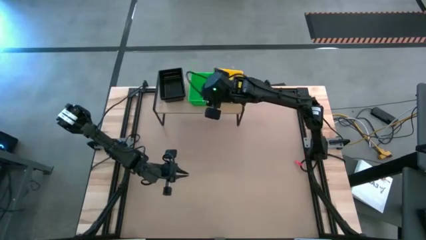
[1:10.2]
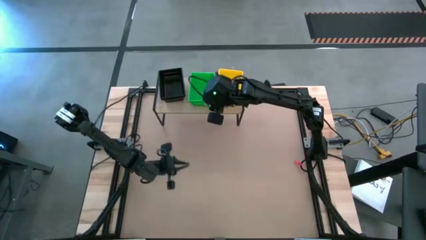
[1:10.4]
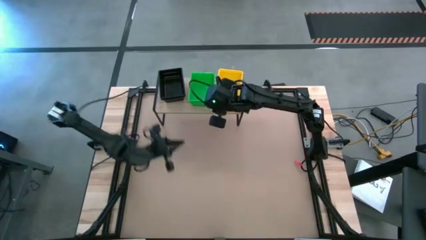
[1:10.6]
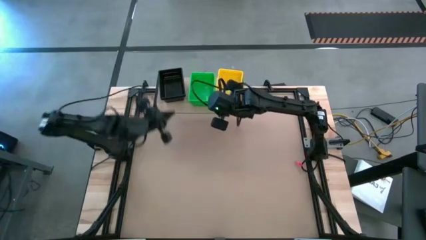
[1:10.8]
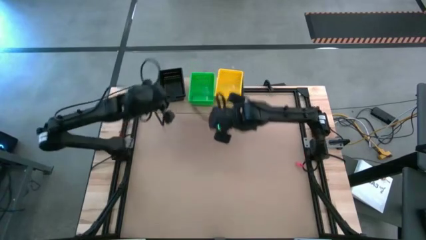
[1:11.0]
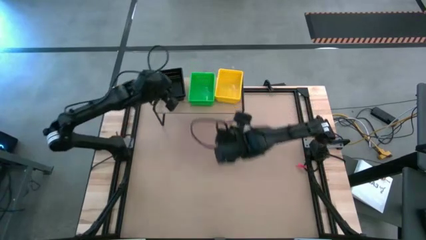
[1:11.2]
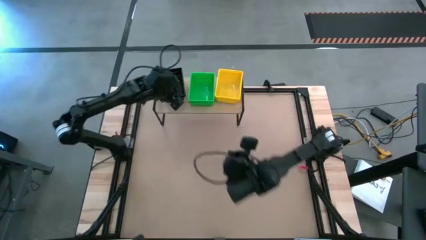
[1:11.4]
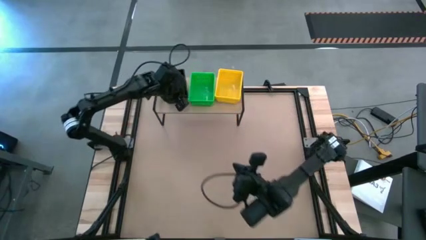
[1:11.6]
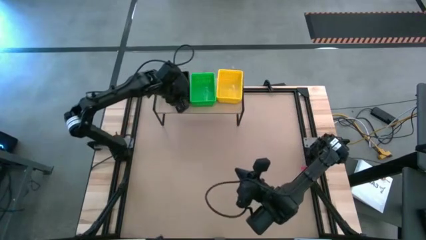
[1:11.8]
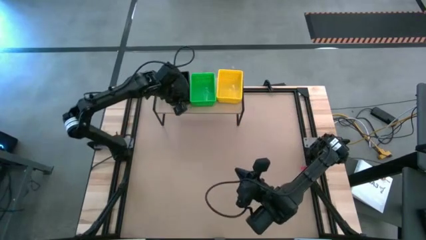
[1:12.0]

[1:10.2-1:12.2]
Task: Stack baskets on shelf by color
Adjust the stacked black bins on the shelf

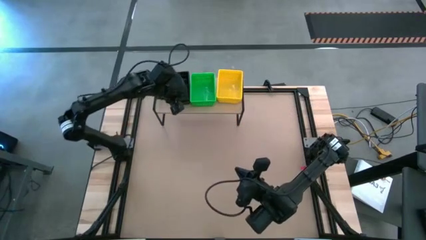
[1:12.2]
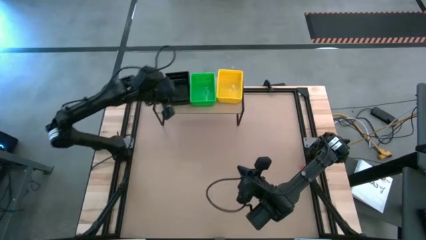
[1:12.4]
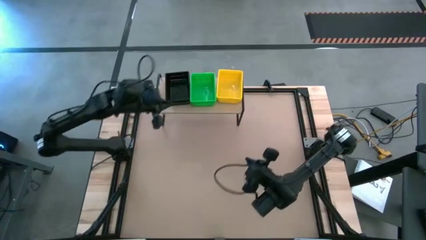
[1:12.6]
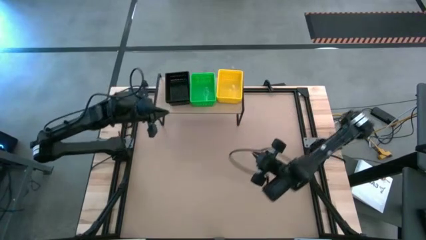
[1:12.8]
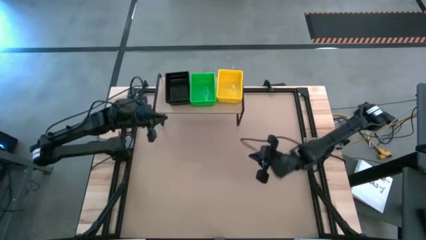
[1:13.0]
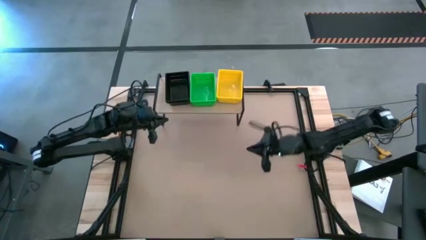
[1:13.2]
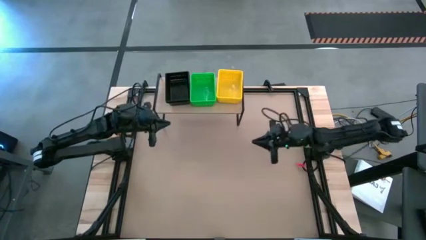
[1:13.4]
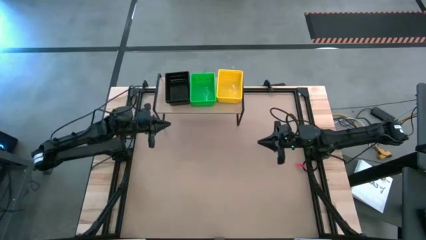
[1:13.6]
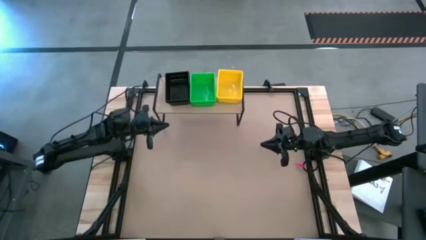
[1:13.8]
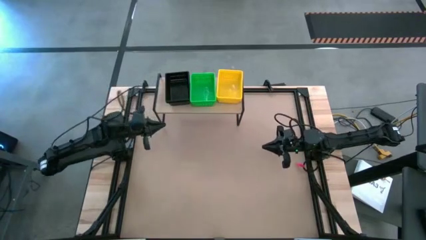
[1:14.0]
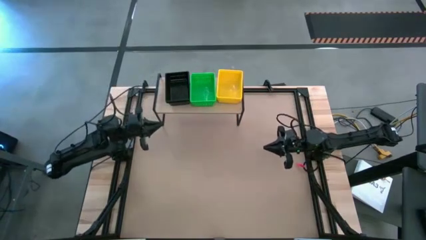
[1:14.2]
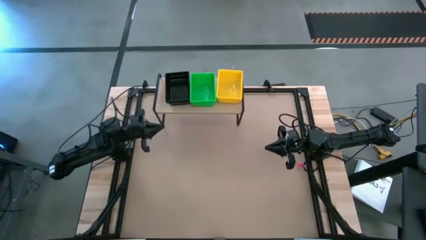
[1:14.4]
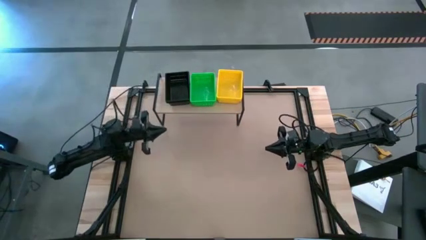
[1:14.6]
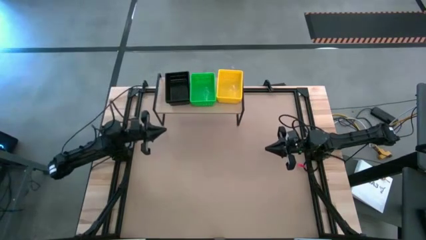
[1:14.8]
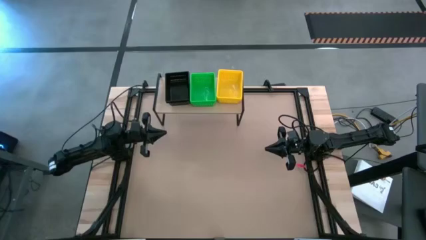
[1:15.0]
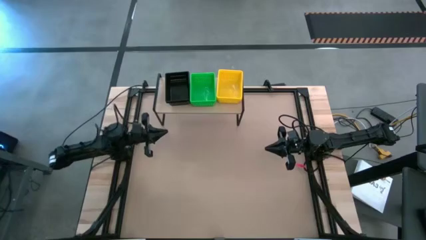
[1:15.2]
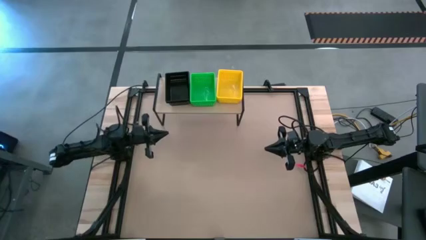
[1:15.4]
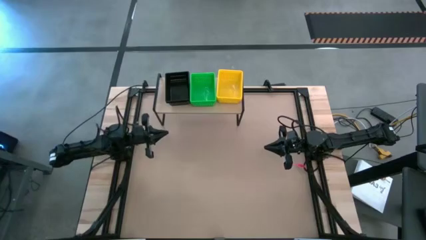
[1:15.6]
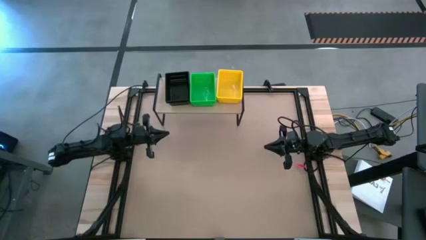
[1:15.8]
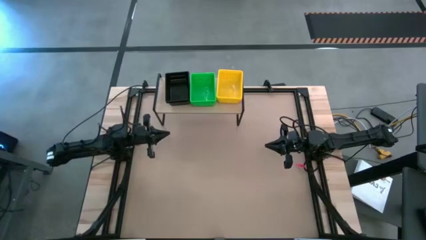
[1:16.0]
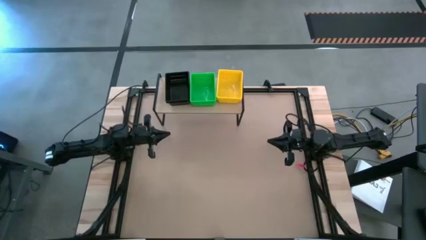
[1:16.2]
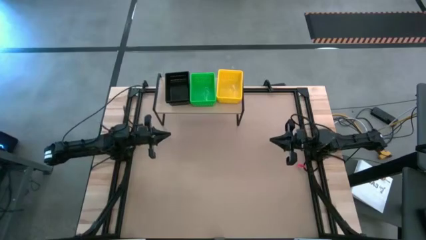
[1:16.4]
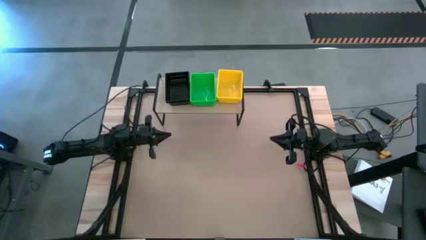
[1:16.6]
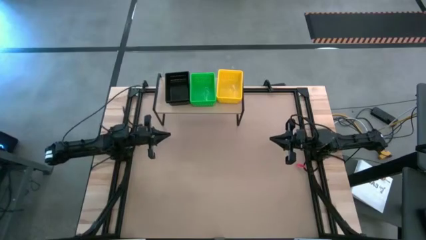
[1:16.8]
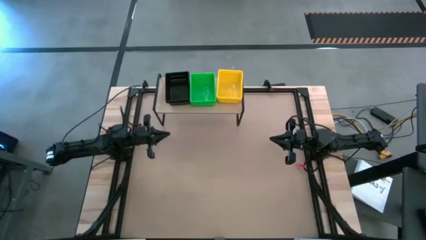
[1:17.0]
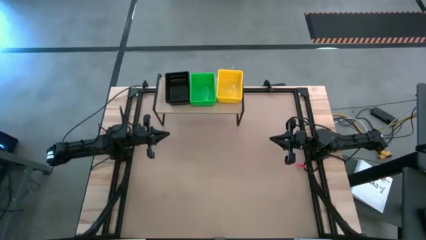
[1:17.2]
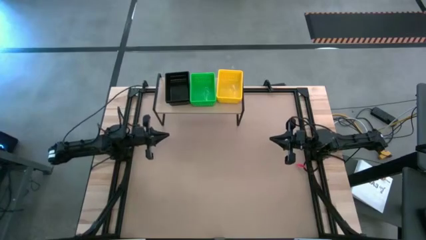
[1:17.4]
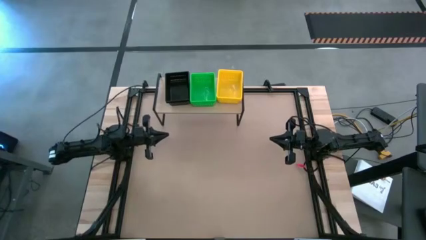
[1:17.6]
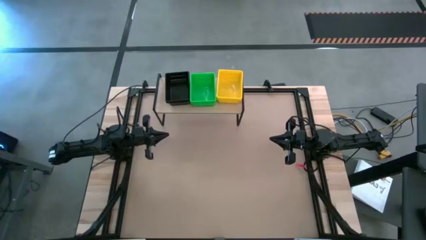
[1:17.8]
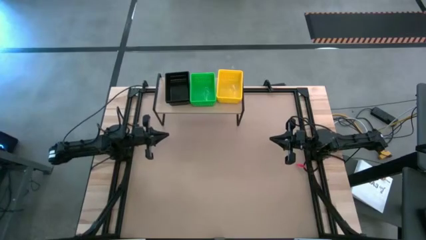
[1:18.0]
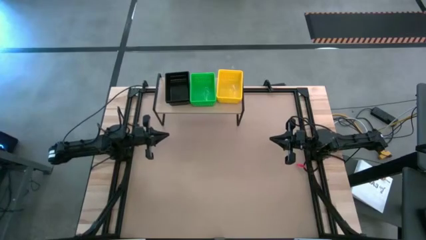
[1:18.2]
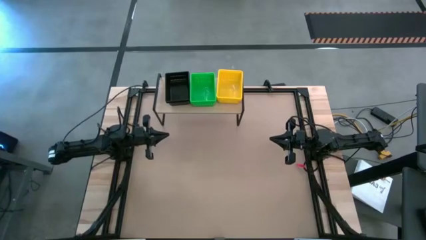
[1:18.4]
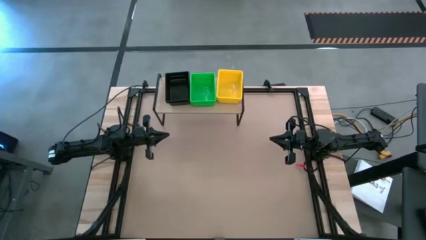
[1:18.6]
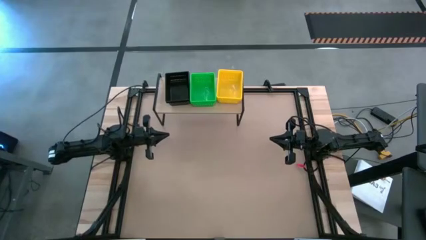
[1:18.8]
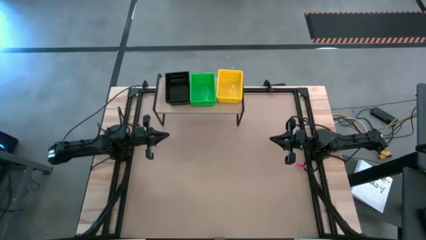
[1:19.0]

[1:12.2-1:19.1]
Return to Home Position
